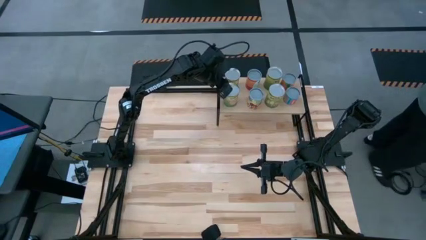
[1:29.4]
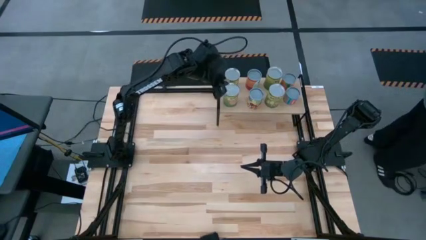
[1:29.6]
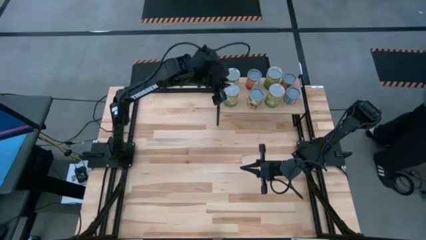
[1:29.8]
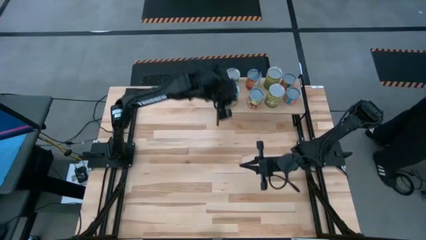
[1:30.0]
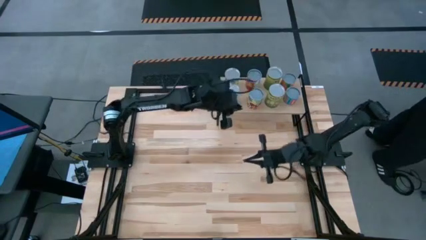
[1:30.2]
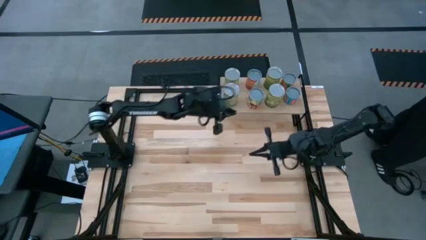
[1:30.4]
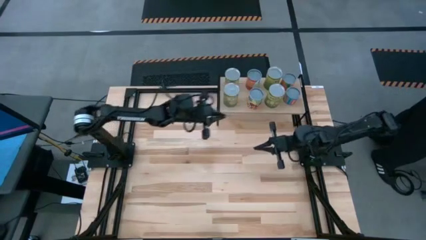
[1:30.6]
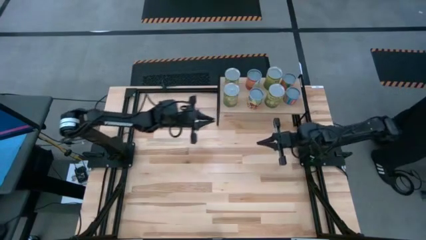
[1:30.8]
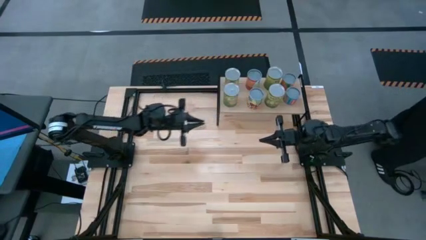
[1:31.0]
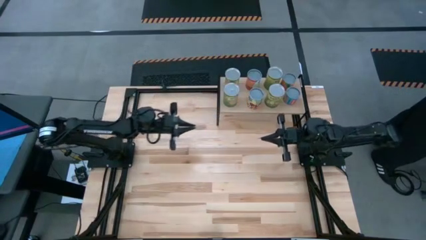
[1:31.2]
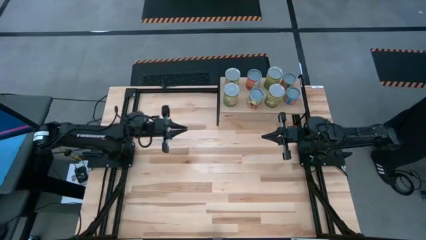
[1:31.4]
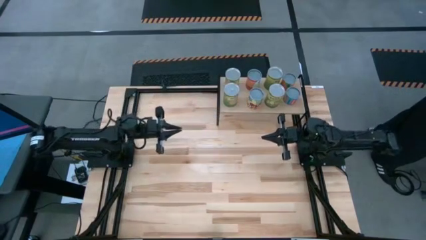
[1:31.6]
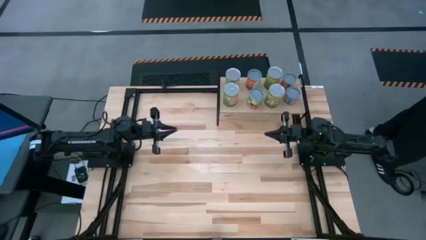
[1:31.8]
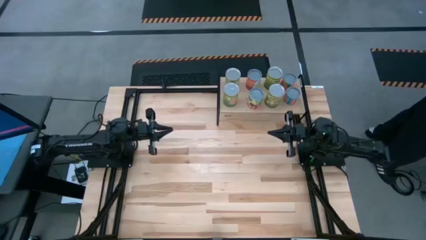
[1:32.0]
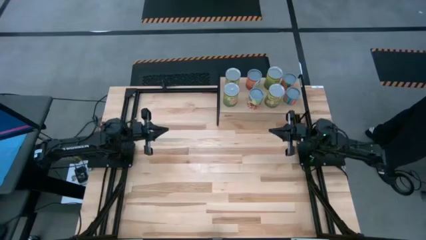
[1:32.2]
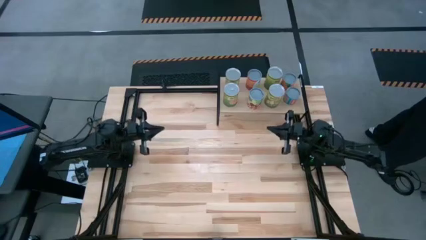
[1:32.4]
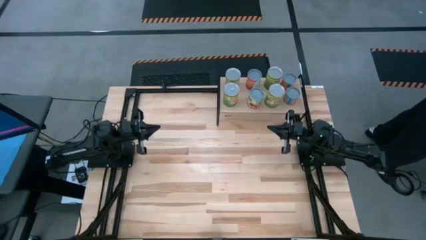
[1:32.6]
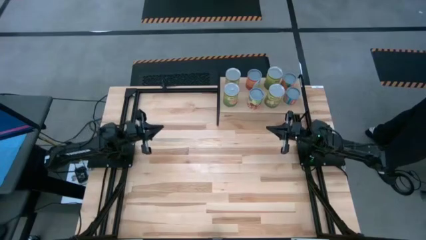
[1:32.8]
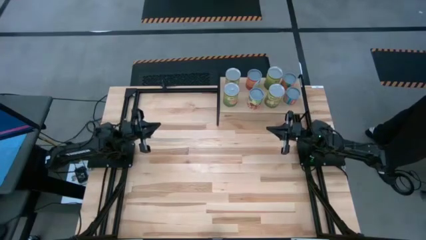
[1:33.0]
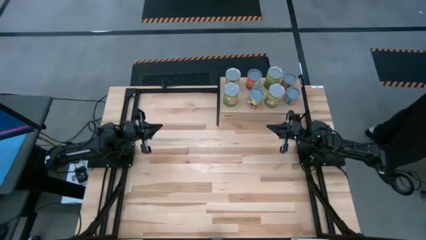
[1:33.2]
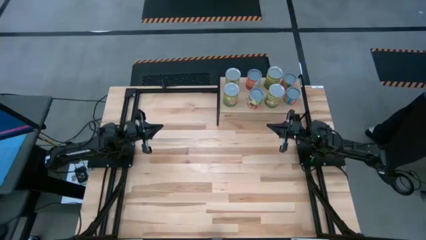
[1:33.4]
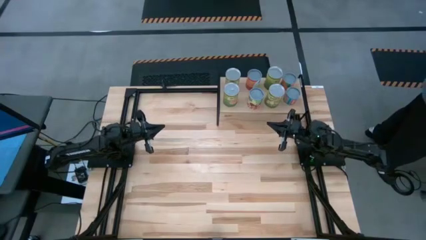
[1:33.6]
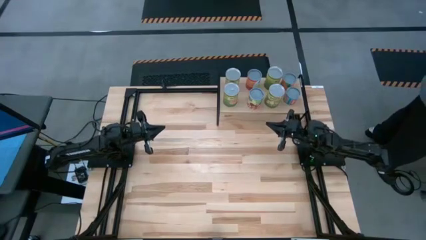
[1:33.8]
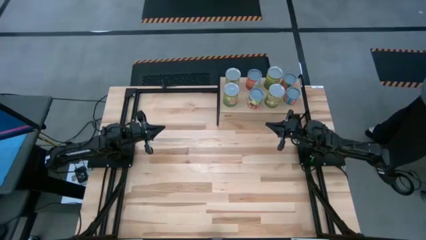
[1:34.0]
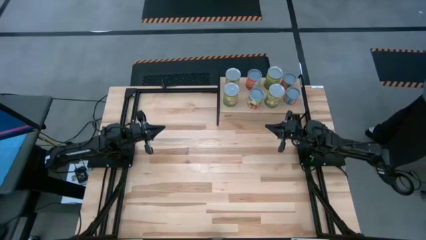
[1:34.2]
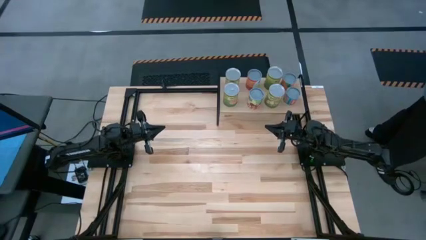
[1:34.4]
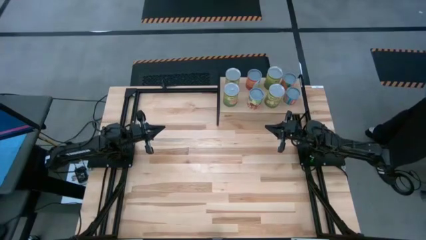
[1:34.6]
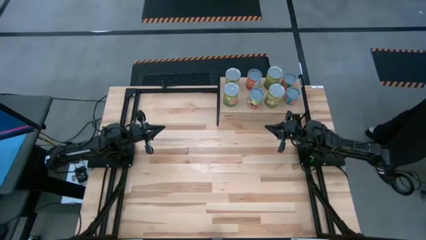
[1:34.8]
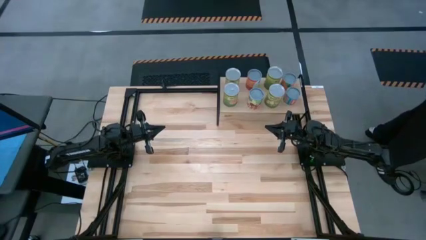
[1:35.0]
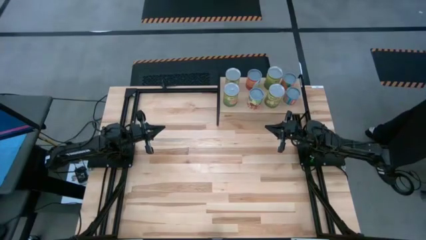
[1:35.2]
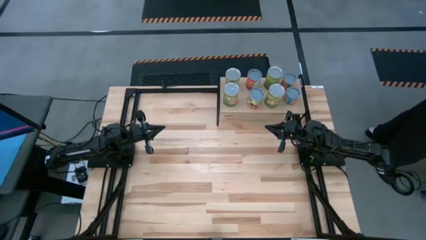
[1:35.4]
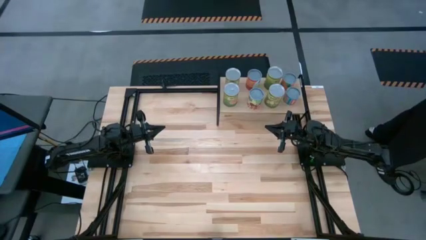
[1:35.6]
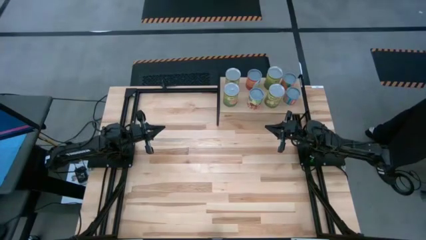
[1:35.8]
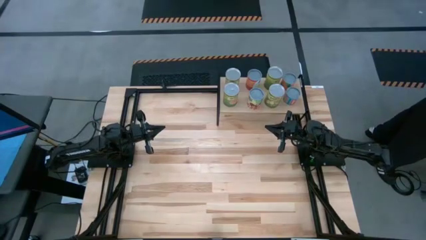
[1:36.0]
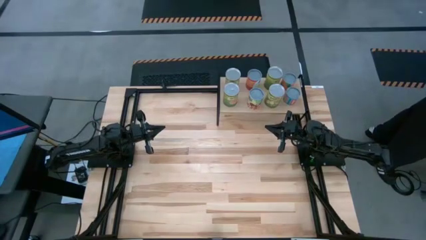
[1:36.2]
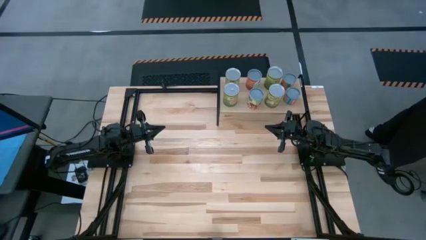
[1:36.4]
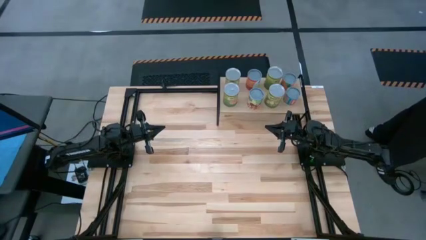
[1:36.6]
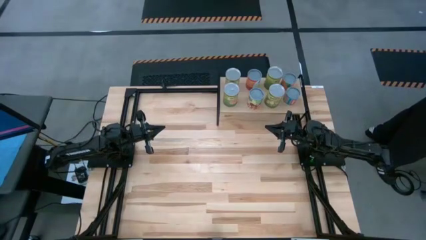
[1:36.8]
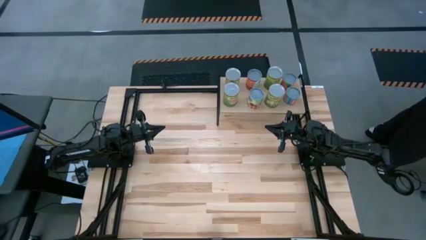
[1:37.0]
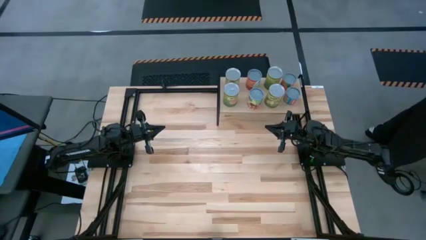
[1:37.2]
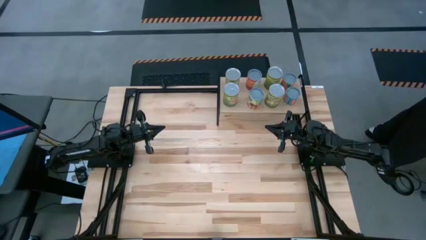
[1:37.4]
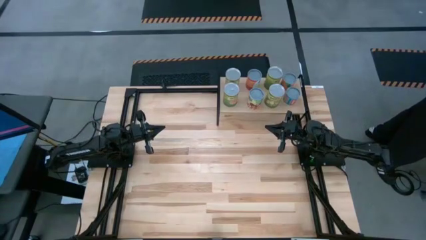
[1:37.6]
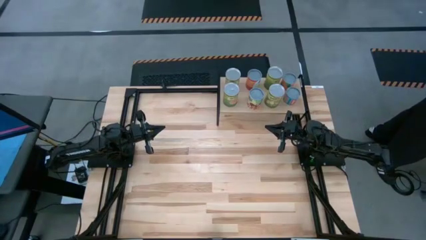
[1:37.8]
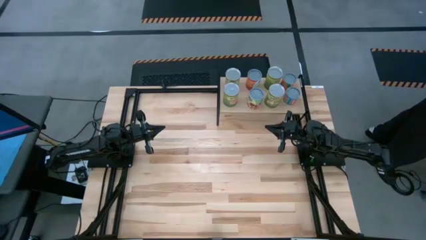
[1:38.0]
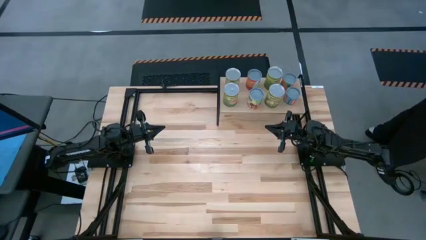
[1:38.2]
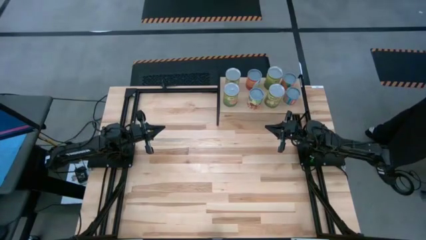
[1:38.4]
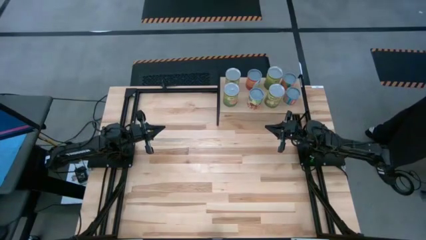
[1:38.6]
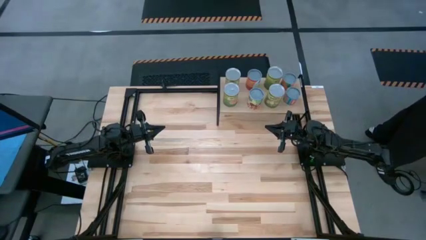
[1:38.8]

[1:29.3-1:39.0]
Task: Pick and place cans onto a shelf
Return to Home Position

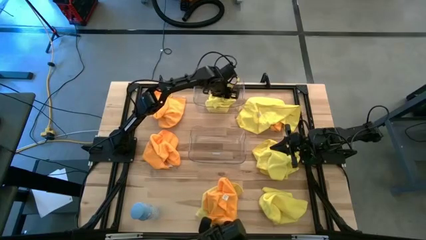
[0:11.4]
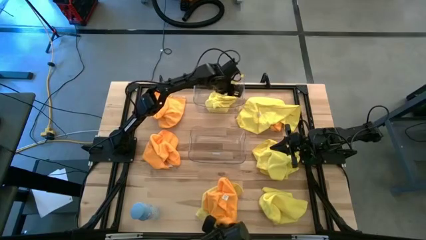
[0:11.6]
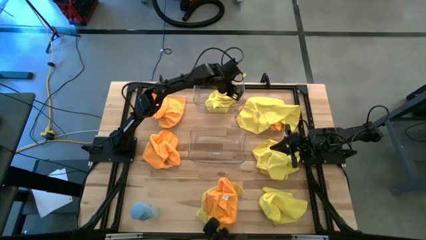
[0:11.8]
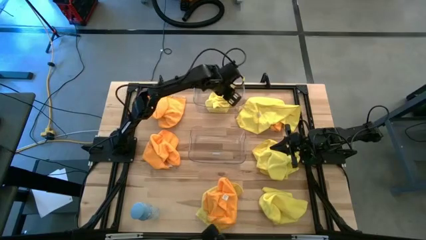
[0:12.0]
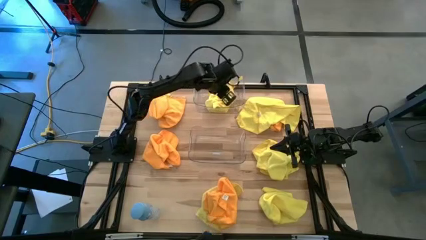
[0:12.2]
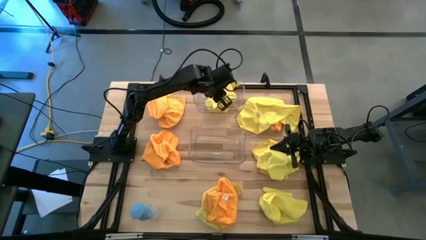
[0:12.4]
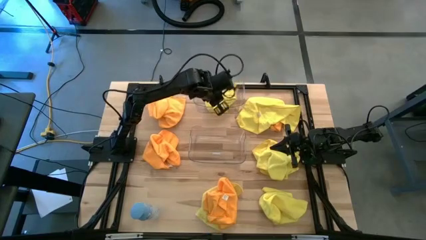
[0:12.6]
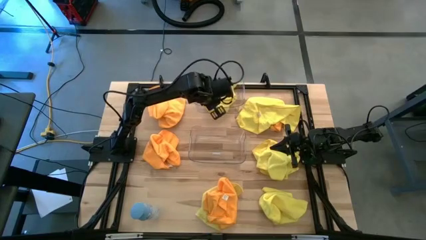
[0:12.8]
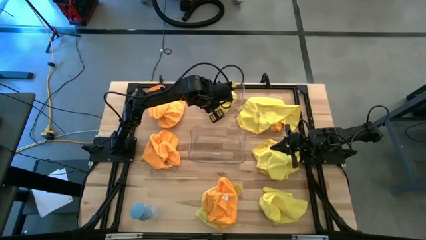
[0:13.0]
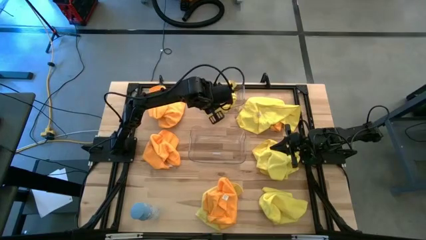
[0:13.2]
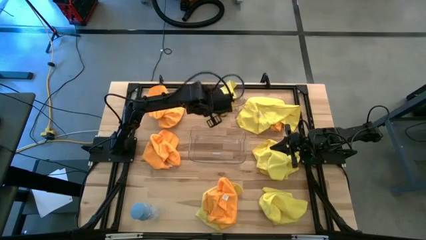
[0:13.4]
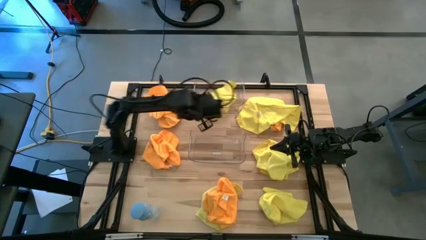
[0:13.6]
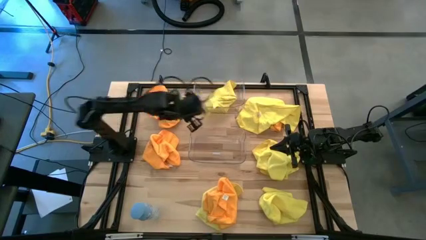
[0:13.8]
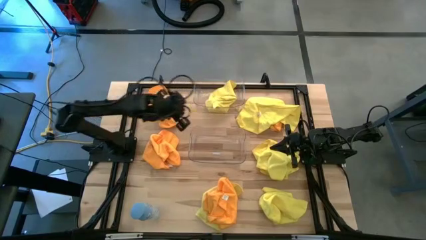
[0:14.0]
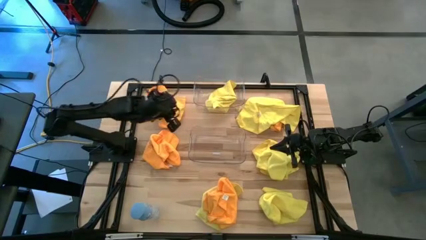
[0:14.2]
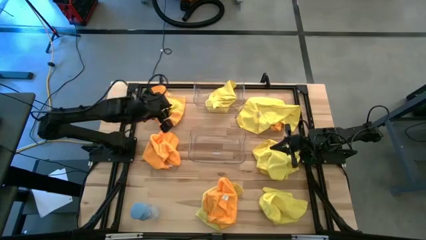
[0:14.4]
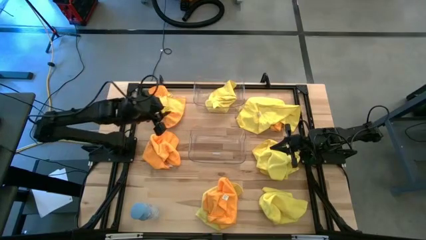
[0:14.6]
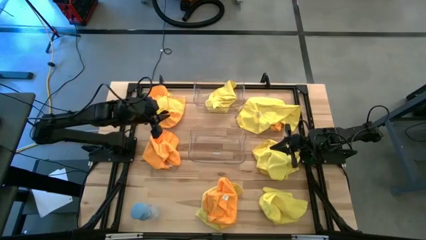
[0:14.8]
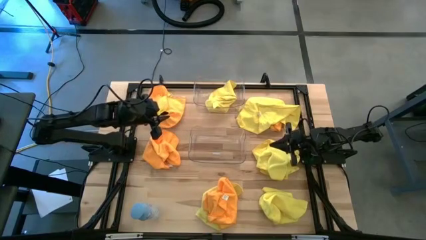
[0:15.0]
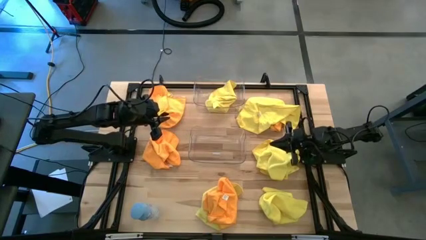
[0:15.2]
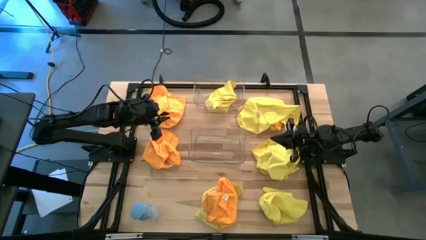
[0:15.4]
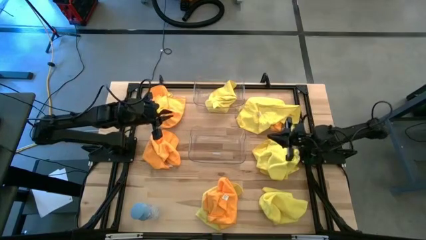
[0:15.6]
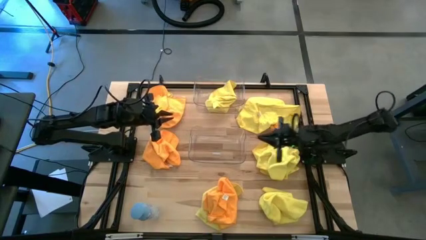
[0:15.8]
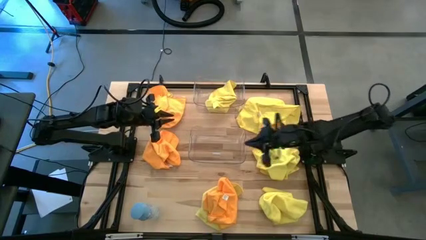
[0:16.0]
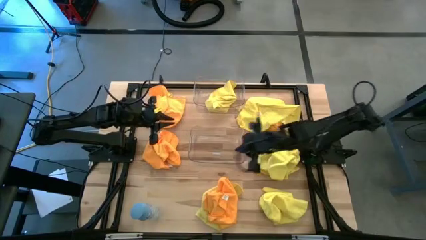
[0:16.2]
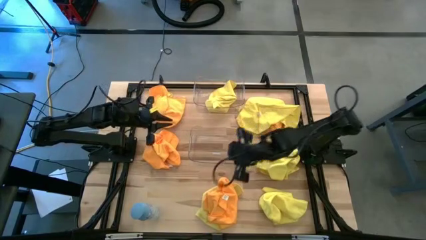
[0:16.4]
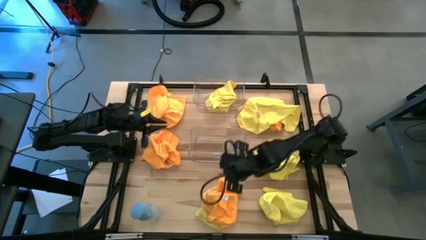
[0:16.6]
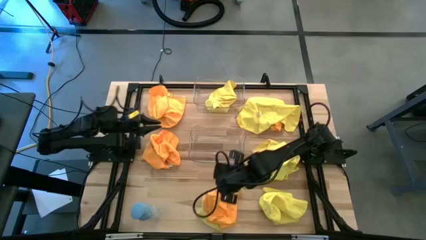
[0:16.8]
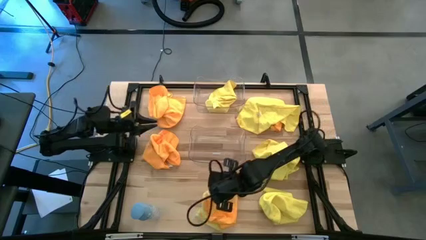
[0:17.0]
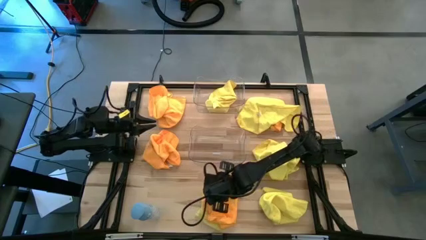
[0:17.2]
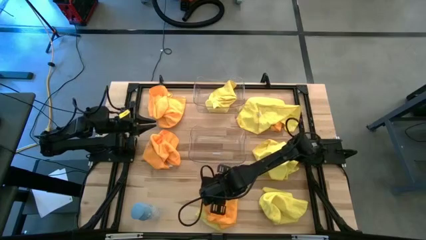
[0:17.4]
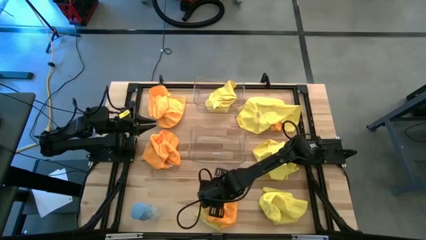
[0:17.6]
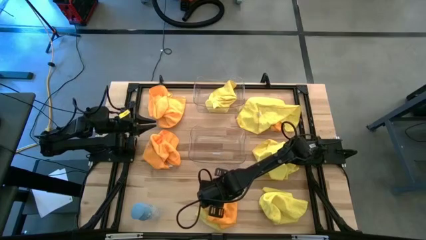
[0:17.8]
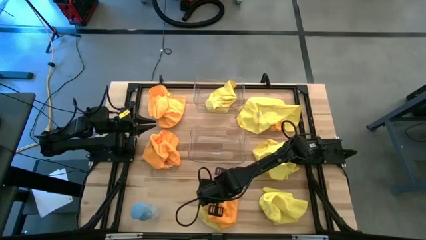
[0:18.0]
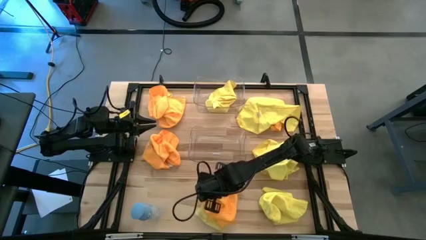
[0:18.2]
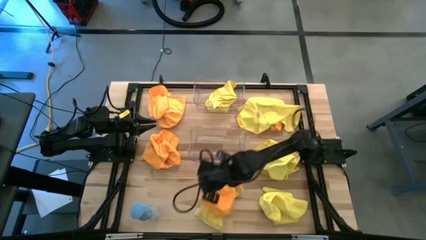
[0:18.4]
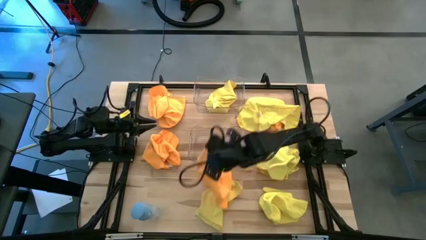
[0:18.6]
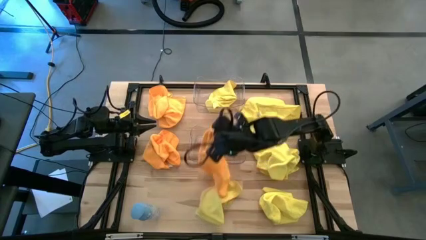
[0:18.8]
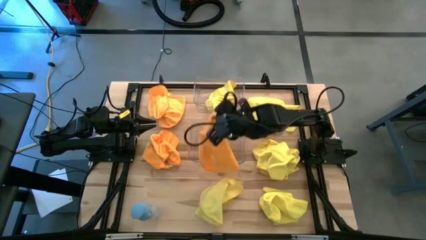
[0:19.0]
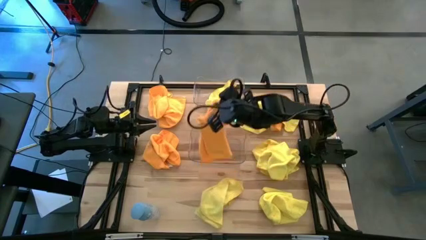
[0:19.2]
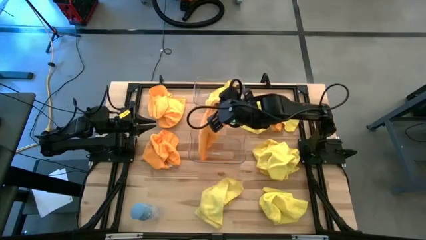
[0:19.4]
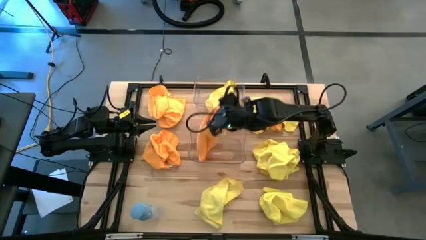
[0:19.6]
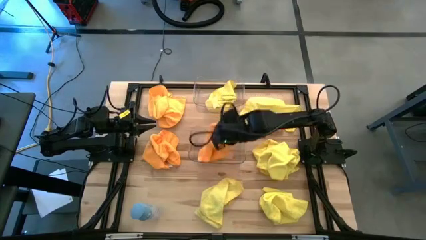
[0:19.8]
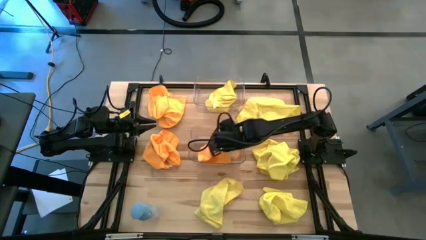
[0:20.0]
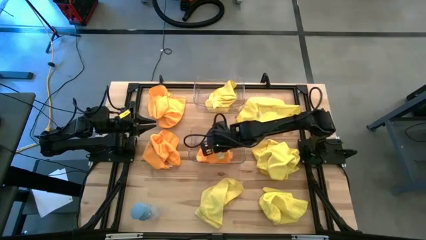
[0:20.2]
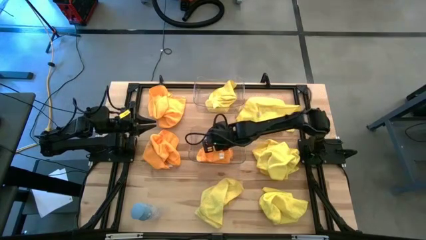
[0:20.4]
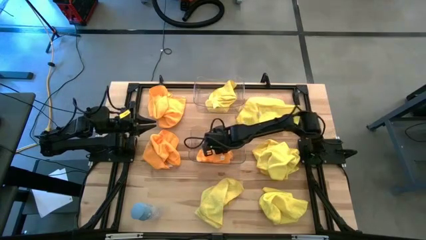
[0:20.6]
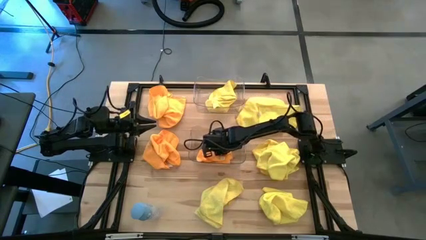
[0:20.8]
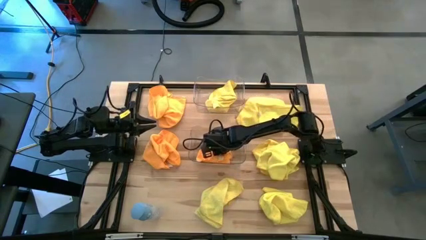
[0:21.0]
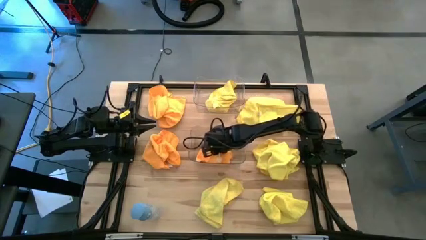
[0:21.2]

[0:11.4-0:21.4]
Task: Sort microfiber towel by color & place in baskets
Put the orange microfiber towel into the bottom transparent bin
